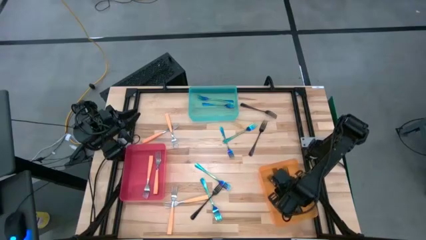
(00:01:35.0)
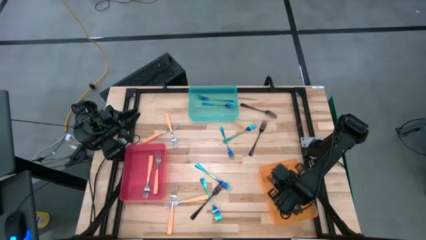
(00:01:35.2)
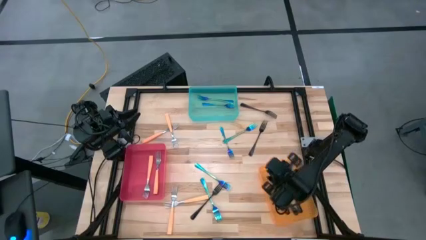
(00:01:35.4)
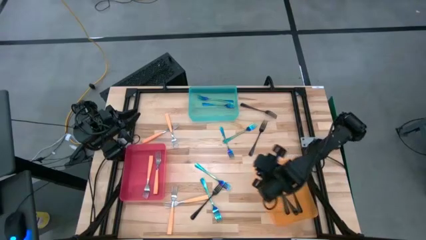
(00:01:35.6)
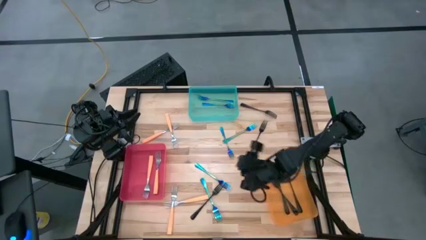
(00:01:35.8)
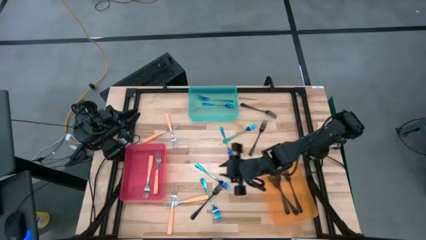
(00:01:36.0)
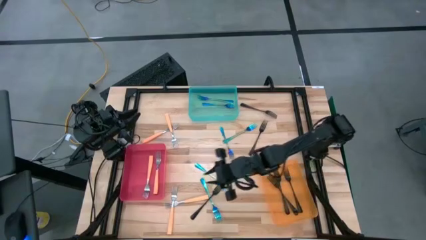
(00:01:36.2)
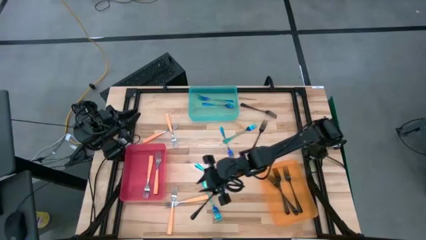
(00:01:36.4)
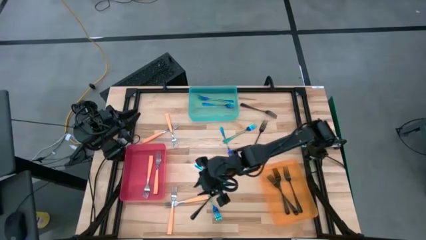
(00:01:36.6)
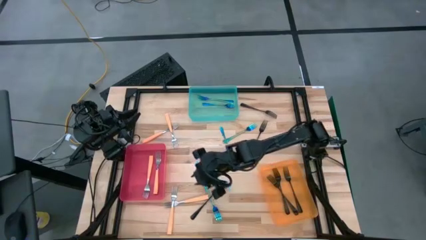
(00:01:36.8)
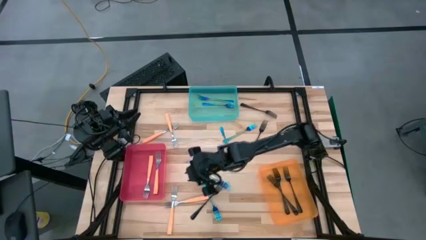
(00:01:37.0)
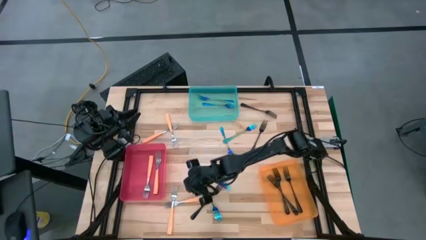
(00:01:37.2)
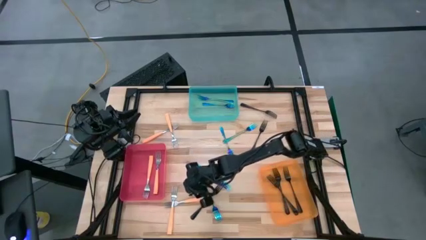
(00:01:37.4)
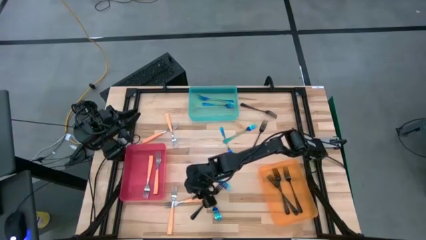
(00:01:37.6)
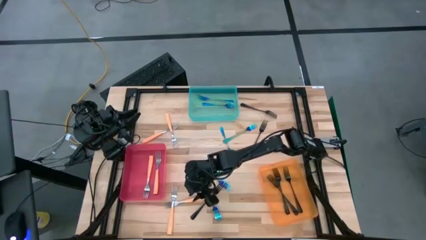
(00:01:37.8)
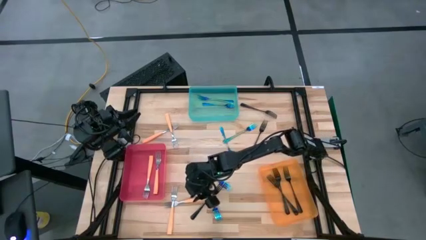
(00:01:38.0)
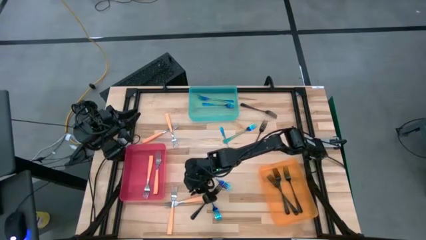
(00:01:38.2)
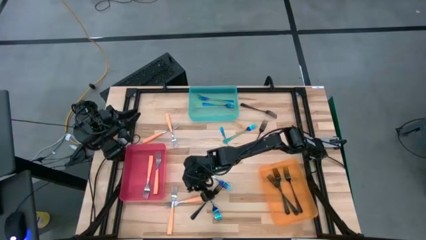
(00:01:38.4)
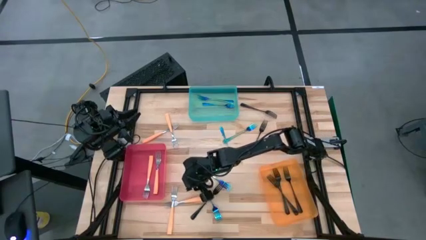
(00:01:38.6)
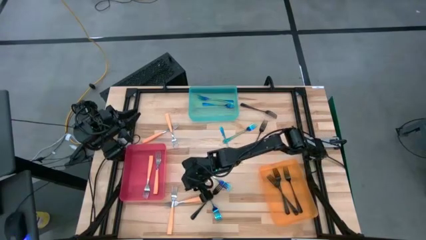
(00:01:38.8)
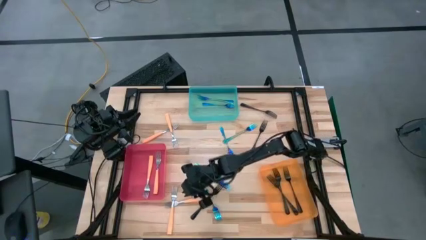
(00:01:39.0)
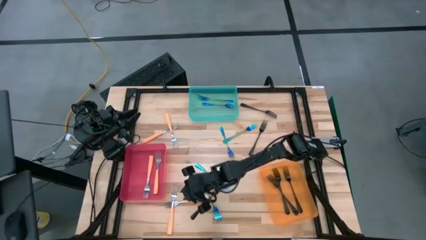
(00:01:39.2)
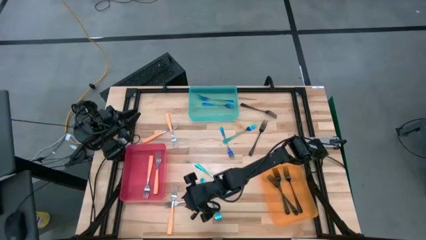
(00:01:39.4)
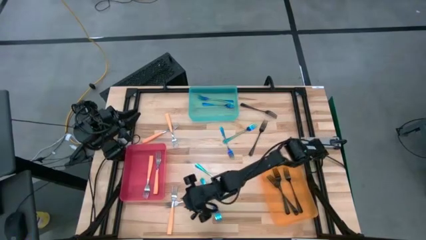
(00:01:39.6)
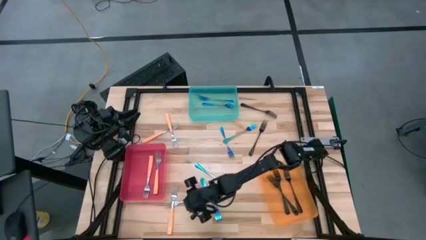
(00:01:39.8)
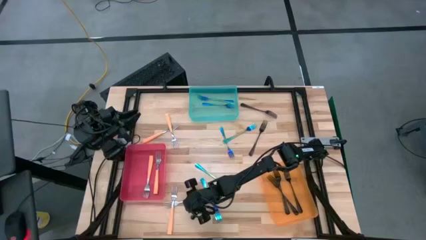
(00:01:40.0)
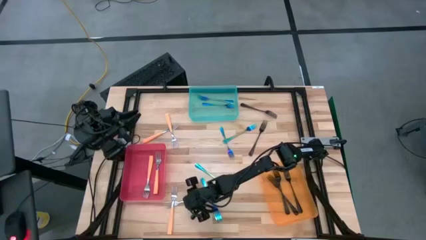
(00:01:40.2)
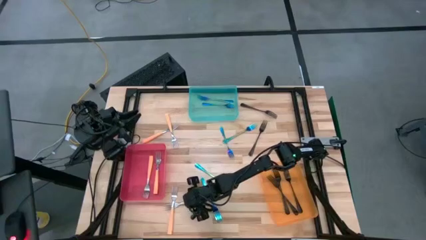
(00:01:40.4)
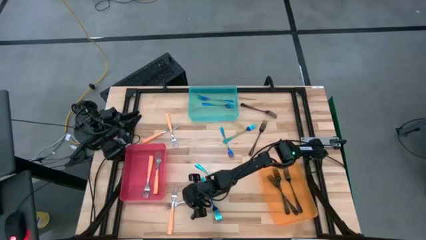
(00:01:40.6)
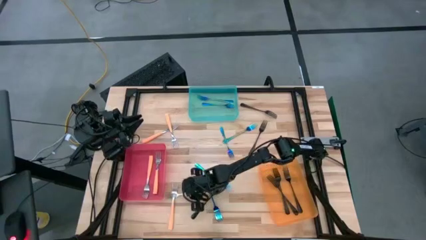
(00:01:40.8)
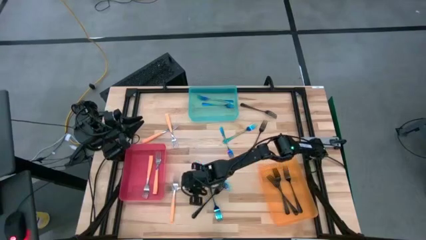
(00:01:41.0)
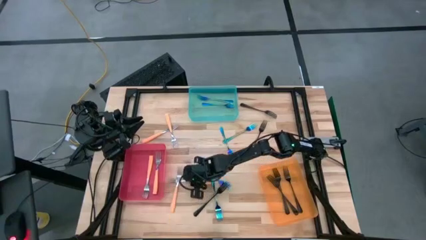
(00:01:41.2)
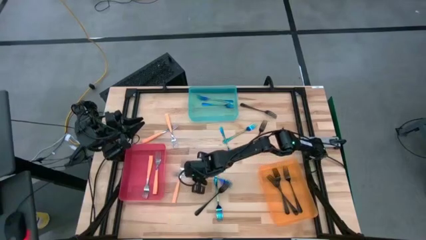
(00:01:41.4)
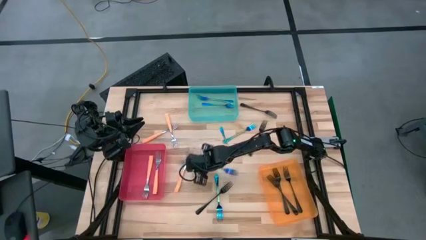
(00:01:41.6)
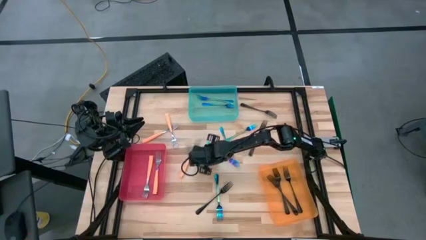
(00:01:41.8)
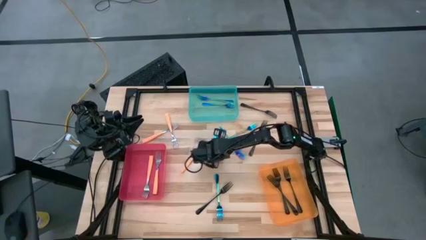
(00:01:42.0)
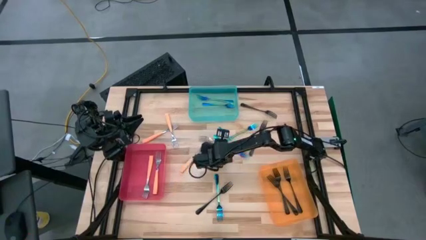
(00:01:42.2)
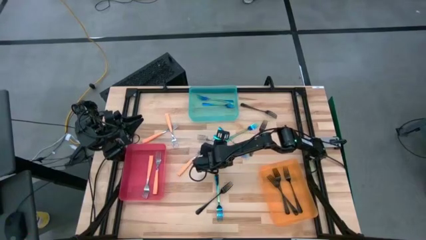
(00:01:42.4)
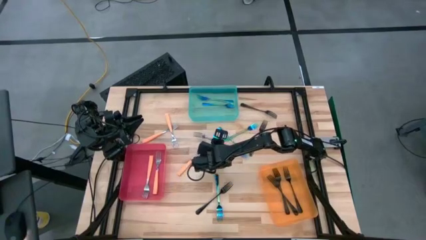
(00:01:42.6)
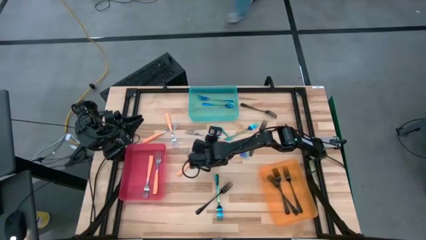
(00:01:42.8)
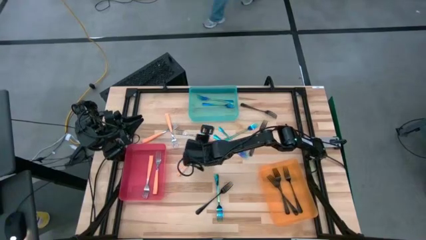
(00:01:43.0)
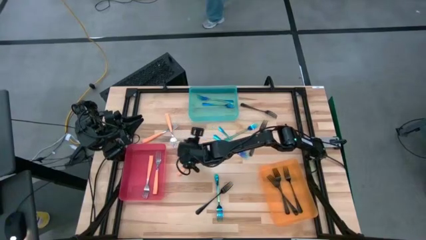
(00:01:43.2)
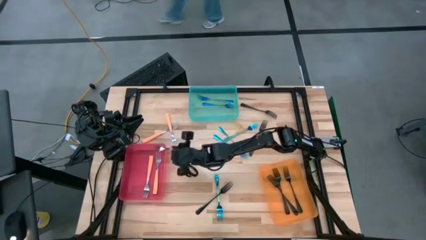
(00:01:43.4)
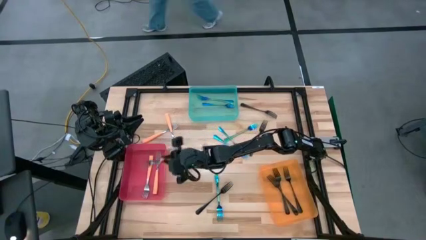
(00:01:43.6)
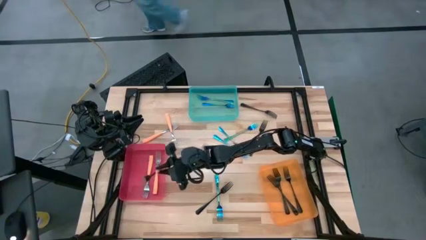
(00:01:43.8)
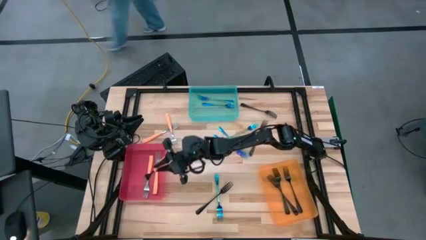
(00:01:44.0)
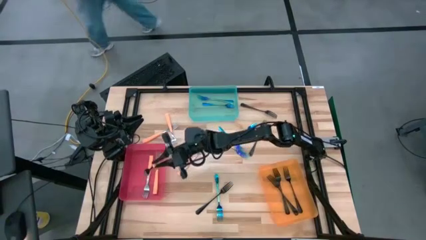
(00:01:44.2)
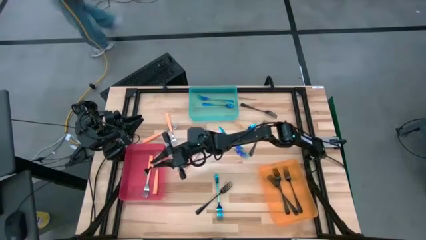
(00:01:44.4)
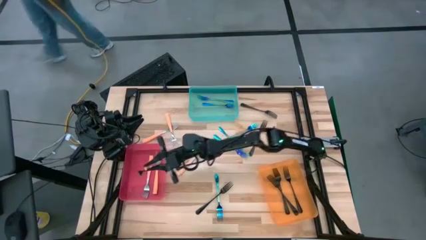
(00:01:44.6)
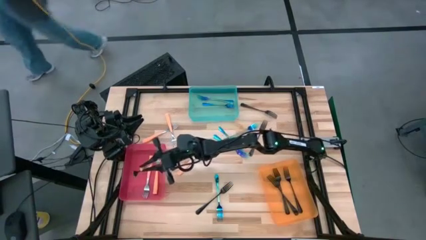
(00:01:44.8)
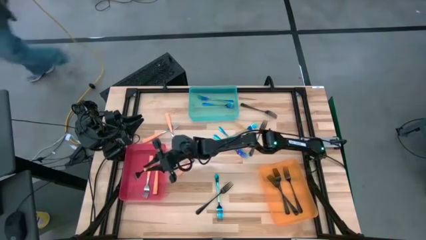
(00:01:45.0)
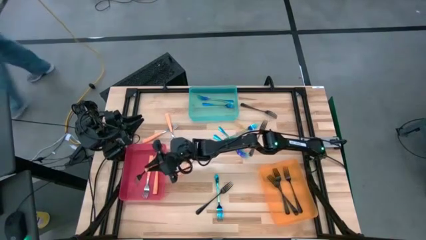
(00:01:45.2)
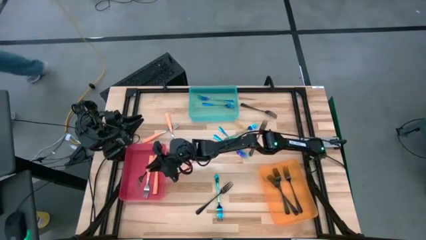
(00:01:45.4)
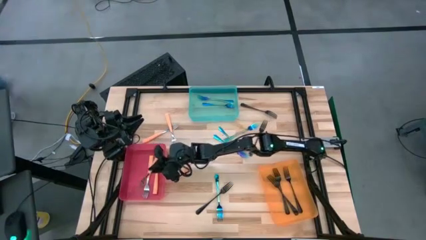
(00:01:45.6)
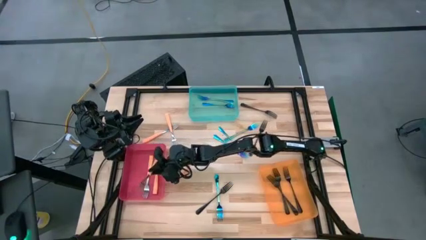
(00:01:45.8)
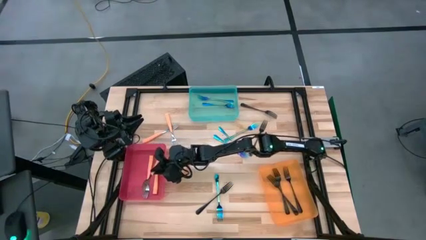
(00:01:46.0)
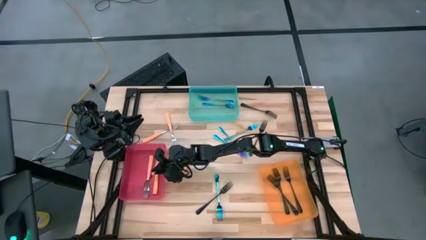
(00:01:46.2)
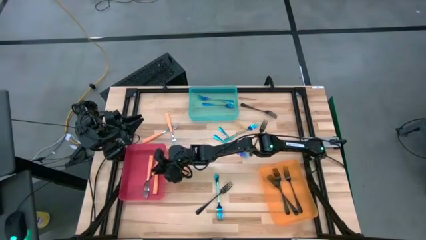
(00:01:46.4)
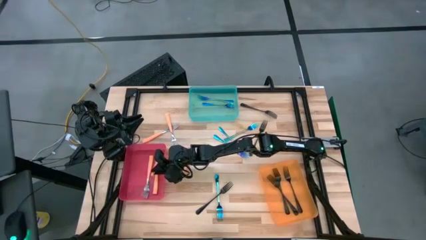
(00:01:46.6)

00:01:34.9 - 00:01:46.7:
Task: Sort silverware by color (type)
Put the orange fork into the red bin

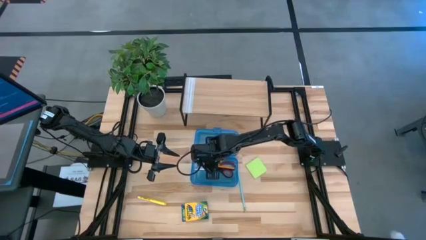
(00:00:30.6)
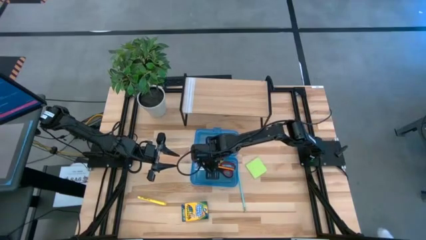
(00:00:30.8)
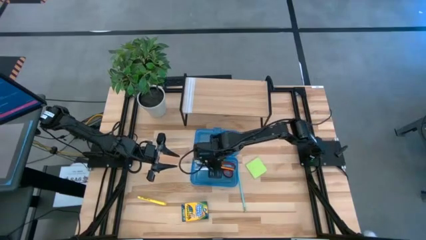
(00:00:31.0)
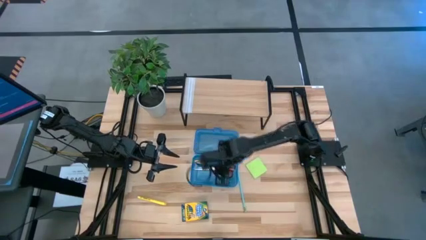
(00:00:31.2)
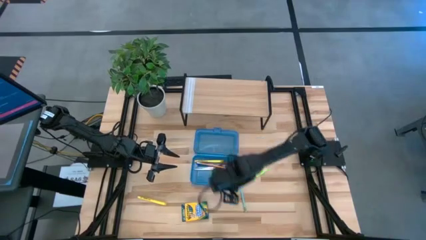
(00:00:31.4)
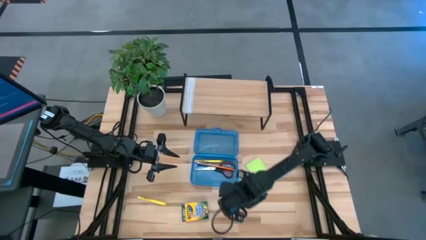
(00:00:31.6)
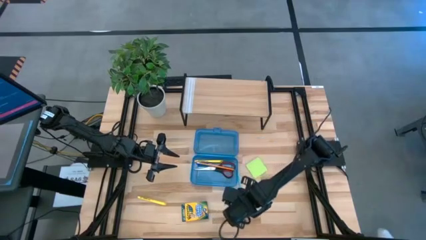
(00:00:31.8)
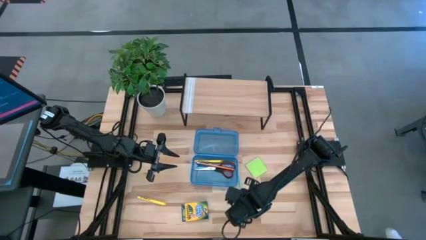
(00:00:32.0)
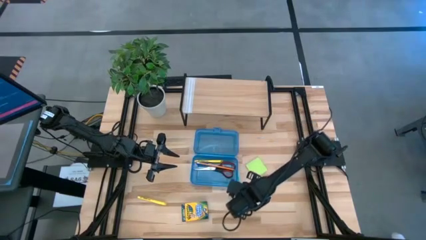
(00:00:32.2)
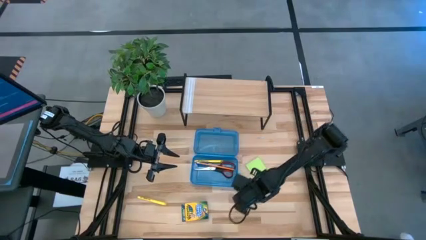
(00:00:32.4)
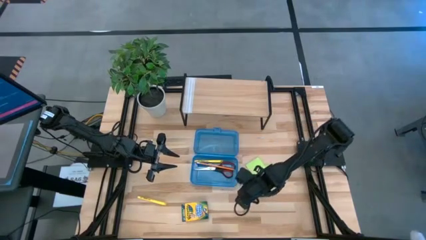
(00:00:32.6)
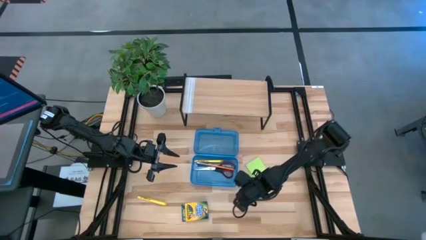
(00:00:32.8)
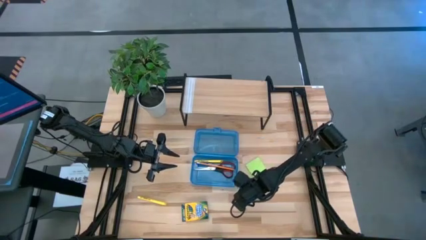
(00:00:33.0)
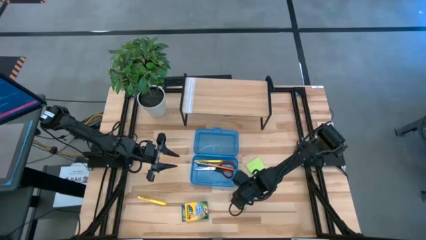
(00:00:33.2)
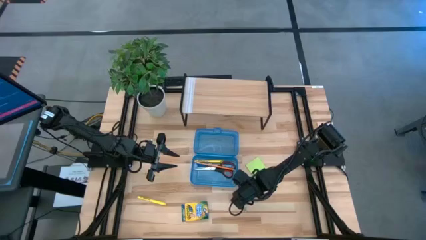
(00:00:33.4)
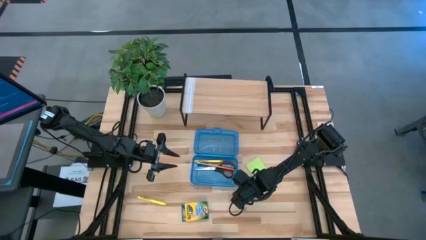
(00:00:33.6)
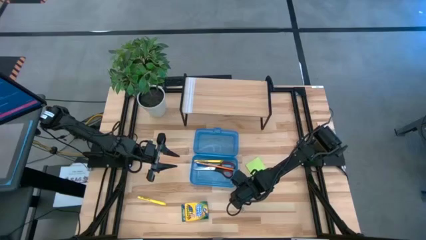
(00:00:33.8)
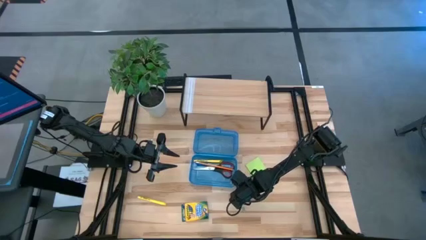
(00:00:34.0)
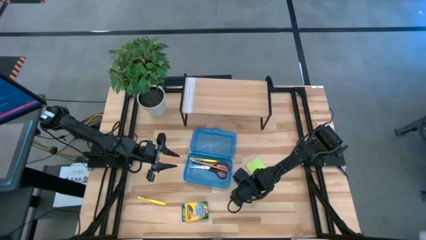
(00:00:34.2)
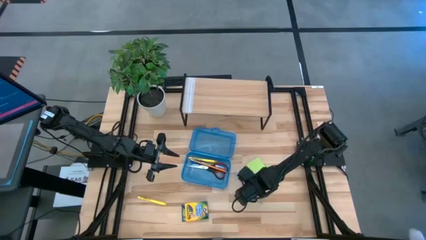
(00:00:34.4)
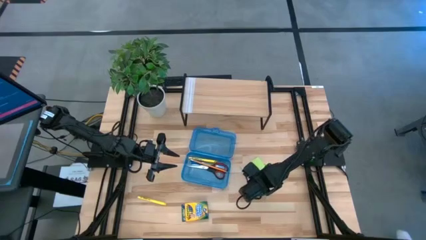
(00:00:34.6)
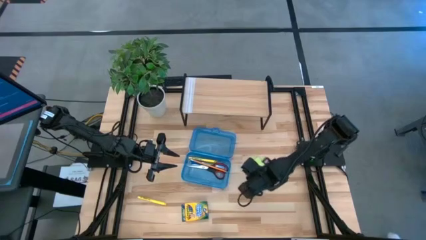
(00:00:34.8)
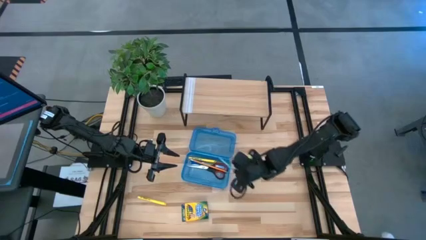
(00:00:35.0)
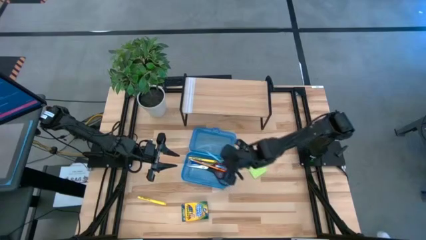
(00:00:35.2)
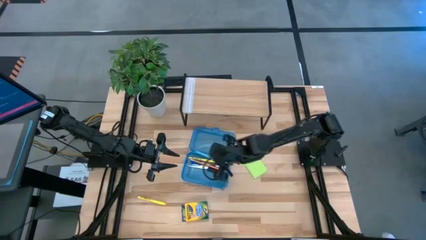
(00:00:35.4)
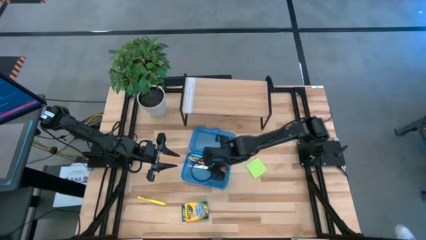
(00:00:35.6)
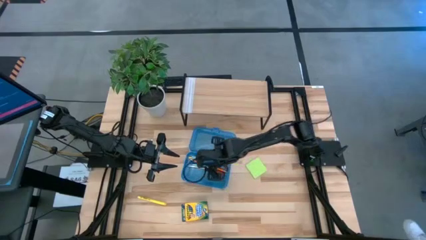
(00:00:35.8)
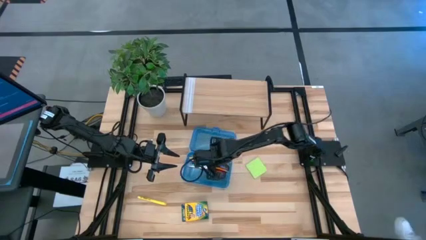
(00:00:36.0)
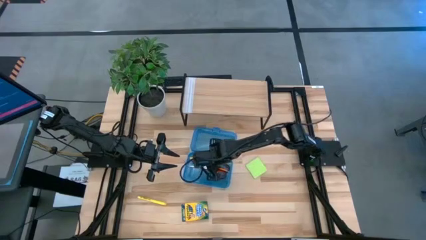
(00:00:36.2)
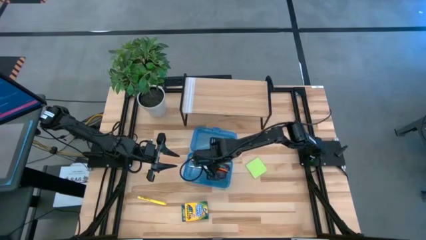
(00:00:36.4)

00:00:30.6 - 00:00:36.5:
Task: Pack school essentials
Put the blue pencil into the blue supply box
